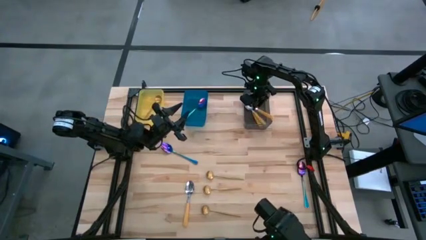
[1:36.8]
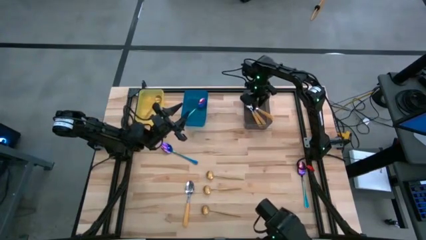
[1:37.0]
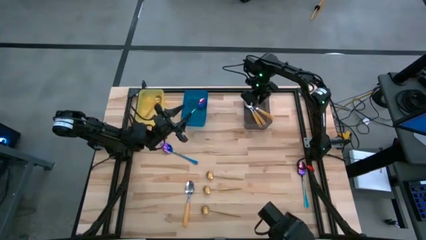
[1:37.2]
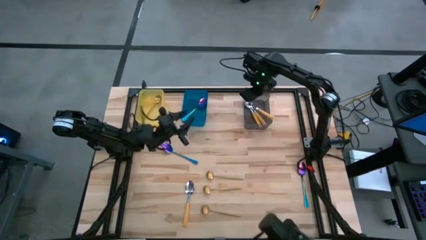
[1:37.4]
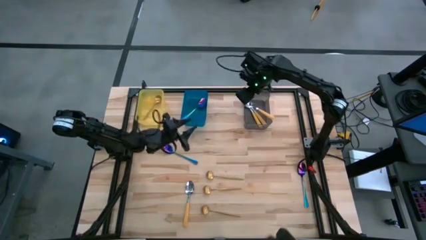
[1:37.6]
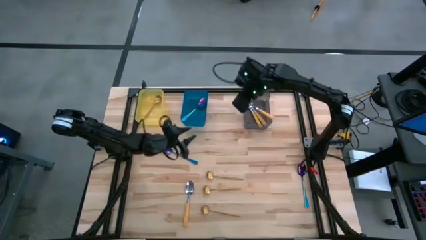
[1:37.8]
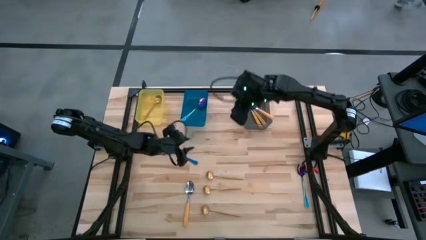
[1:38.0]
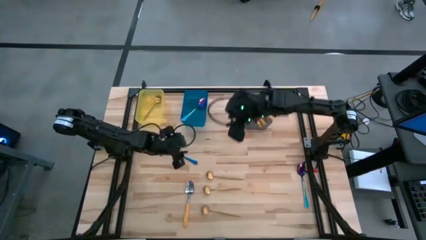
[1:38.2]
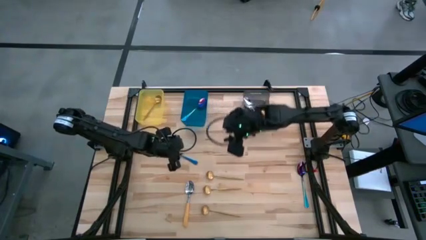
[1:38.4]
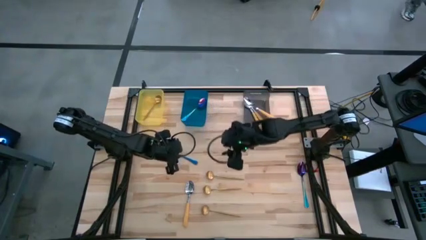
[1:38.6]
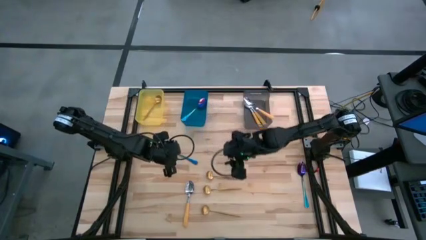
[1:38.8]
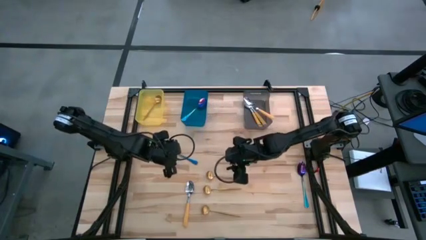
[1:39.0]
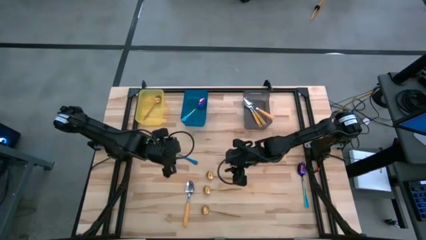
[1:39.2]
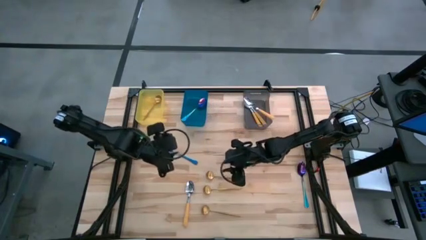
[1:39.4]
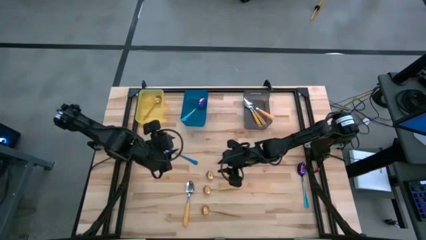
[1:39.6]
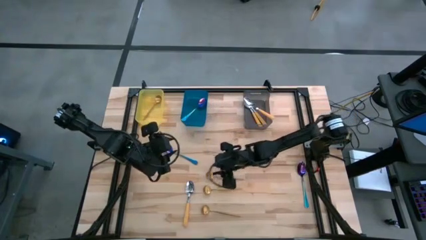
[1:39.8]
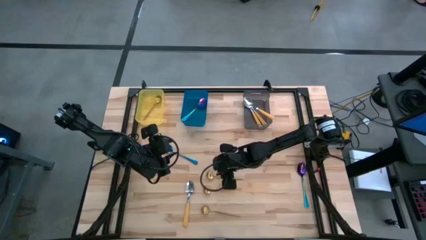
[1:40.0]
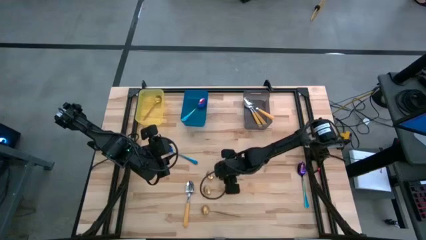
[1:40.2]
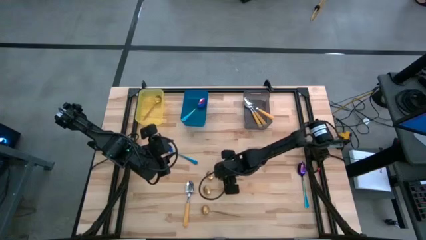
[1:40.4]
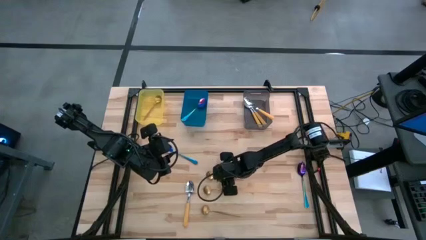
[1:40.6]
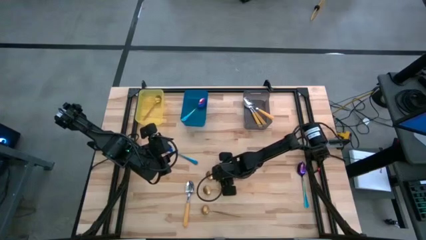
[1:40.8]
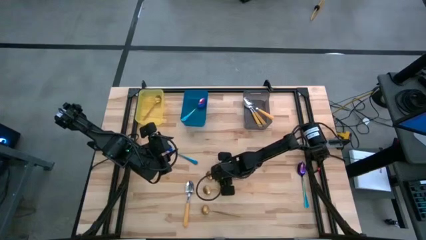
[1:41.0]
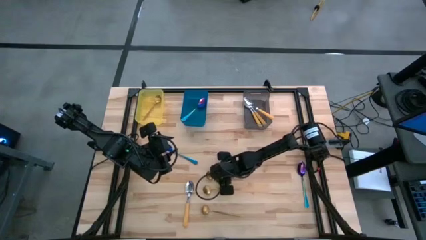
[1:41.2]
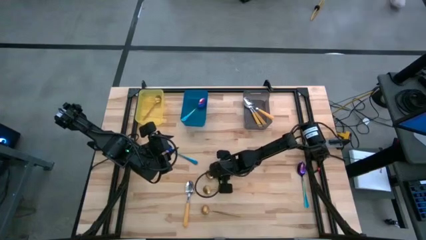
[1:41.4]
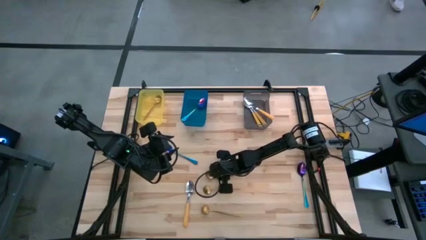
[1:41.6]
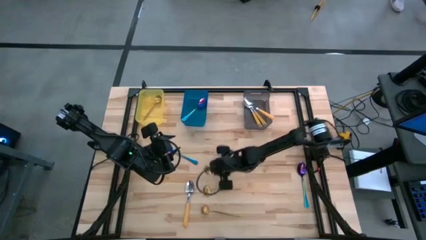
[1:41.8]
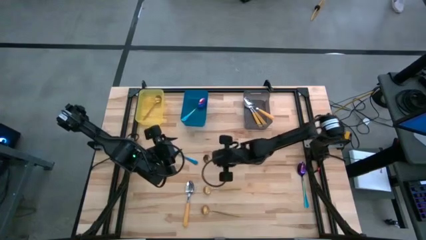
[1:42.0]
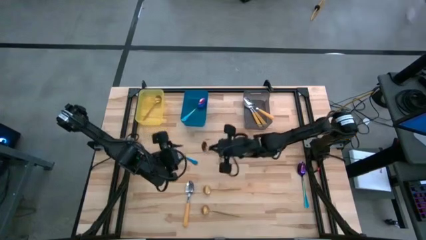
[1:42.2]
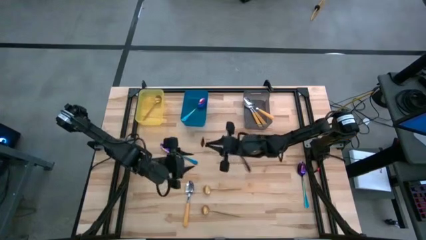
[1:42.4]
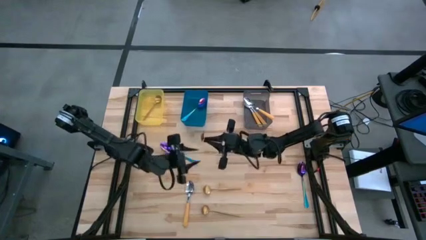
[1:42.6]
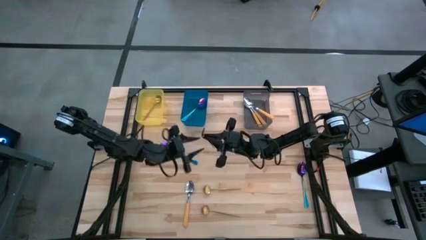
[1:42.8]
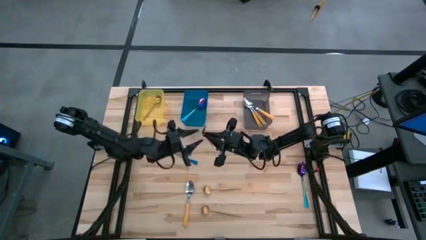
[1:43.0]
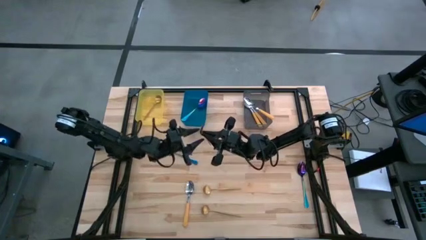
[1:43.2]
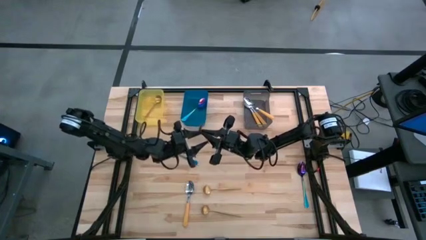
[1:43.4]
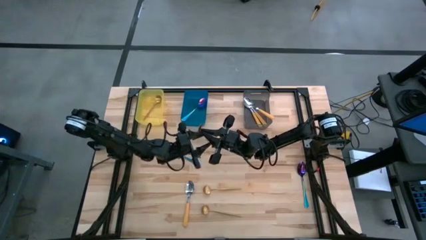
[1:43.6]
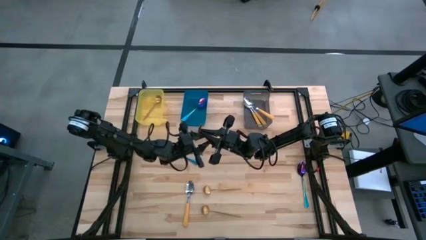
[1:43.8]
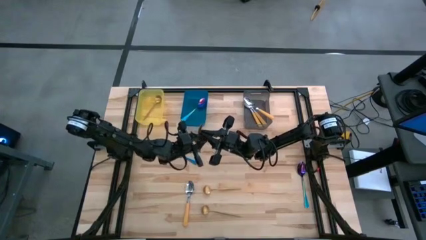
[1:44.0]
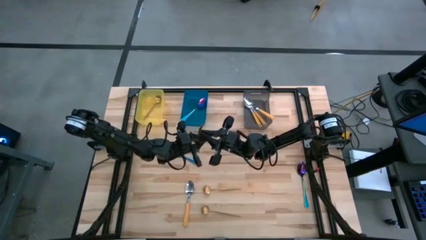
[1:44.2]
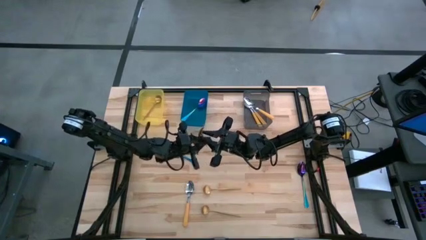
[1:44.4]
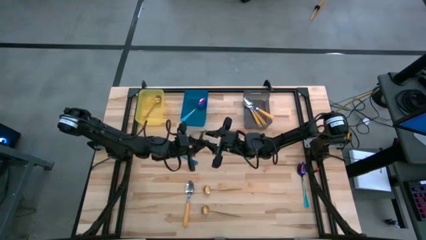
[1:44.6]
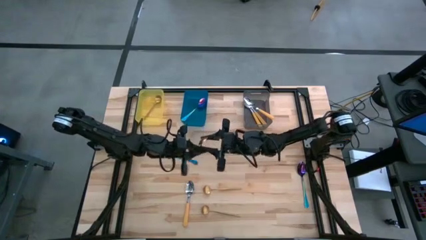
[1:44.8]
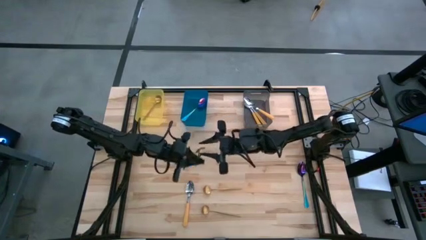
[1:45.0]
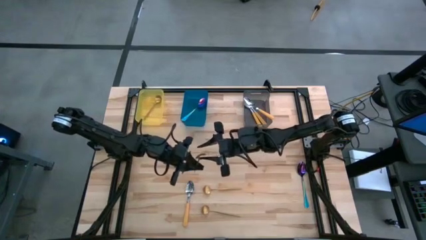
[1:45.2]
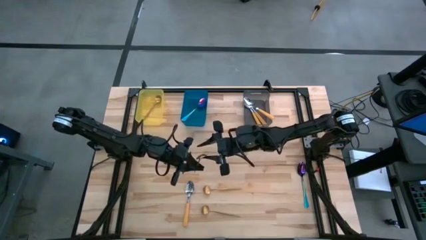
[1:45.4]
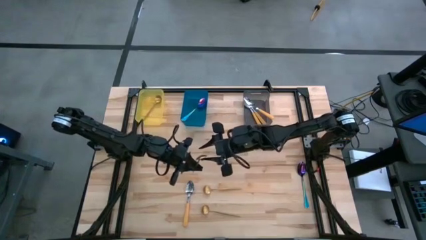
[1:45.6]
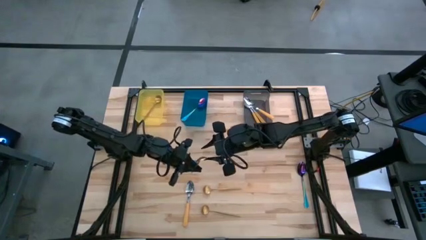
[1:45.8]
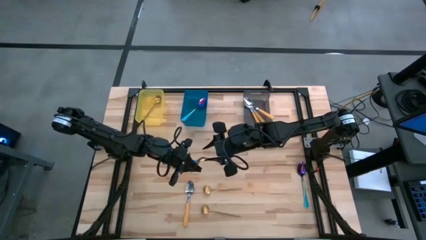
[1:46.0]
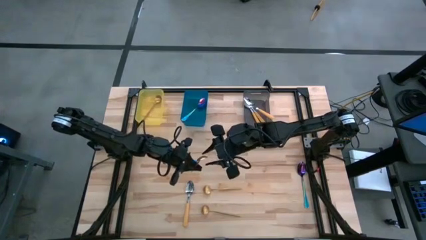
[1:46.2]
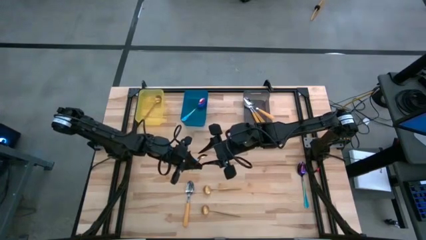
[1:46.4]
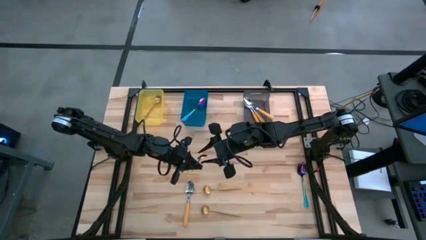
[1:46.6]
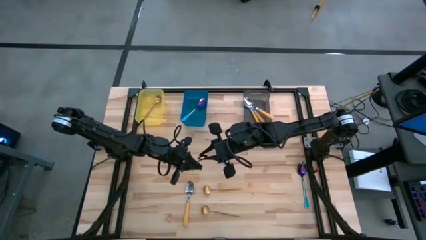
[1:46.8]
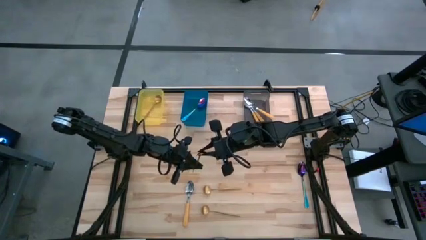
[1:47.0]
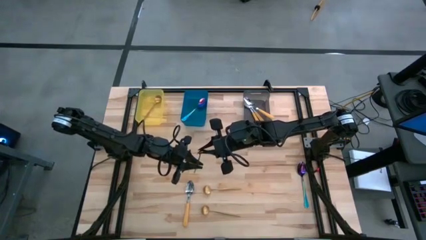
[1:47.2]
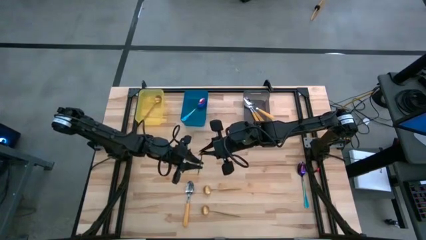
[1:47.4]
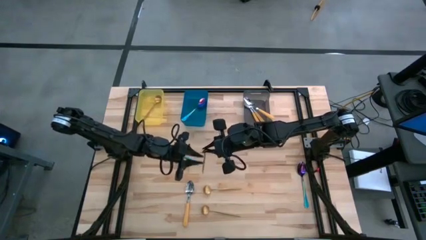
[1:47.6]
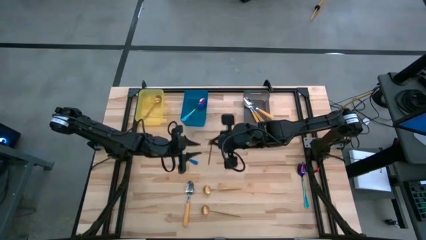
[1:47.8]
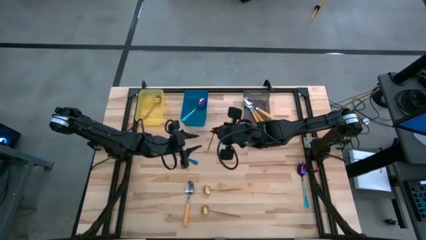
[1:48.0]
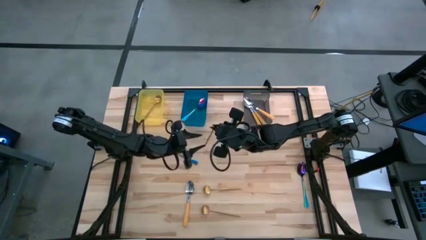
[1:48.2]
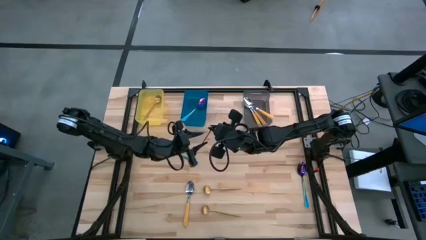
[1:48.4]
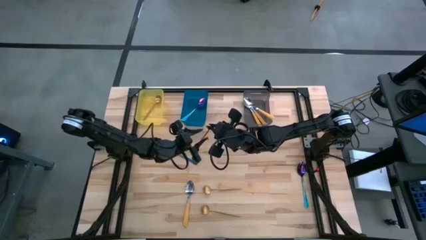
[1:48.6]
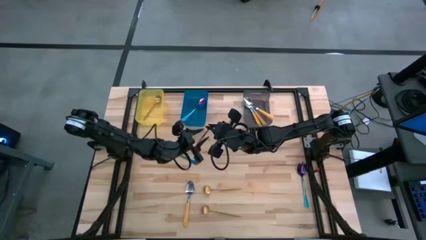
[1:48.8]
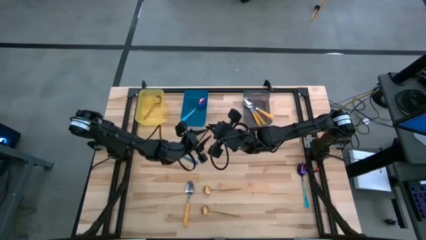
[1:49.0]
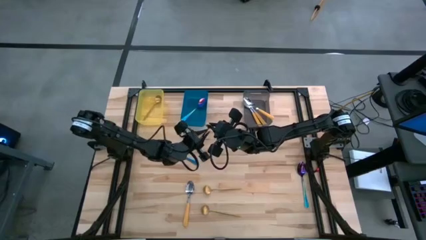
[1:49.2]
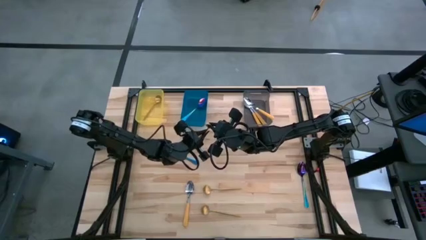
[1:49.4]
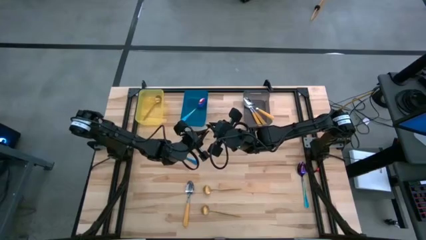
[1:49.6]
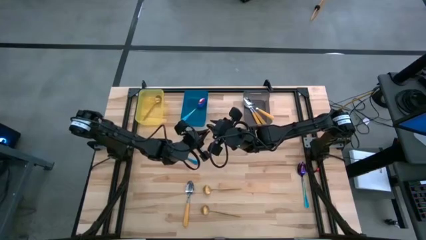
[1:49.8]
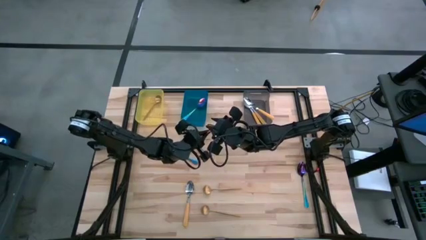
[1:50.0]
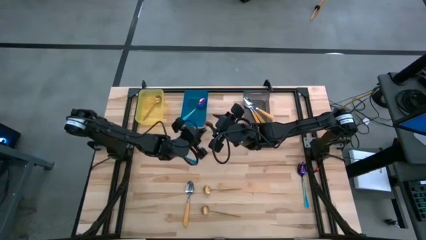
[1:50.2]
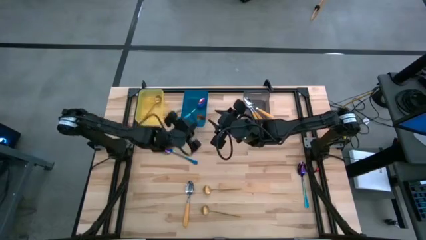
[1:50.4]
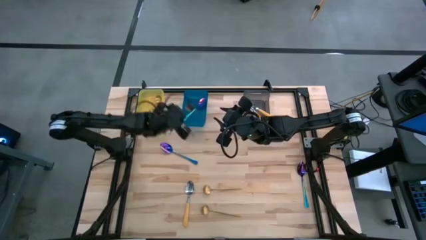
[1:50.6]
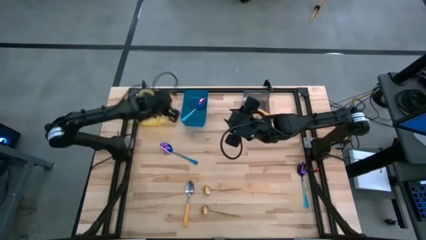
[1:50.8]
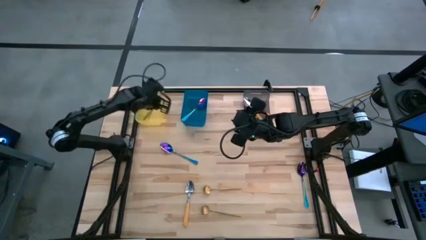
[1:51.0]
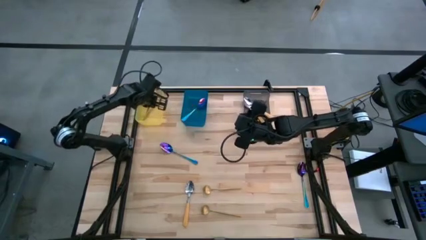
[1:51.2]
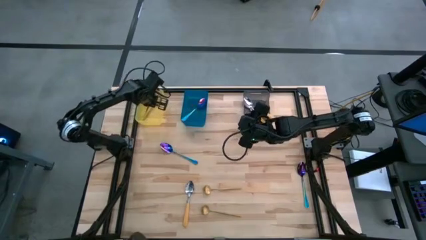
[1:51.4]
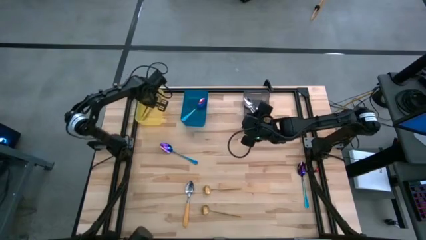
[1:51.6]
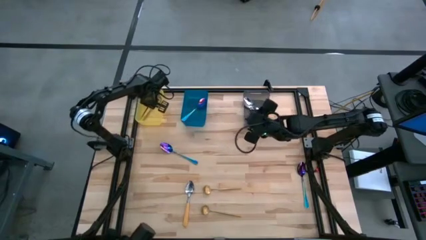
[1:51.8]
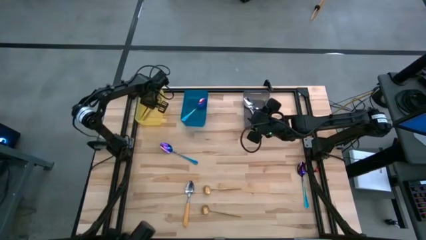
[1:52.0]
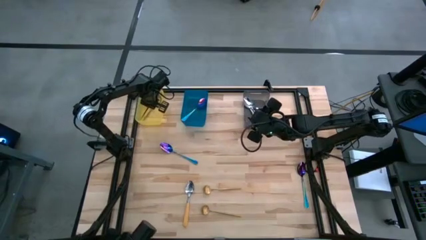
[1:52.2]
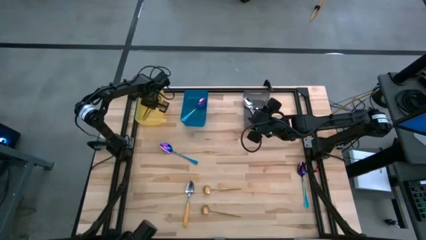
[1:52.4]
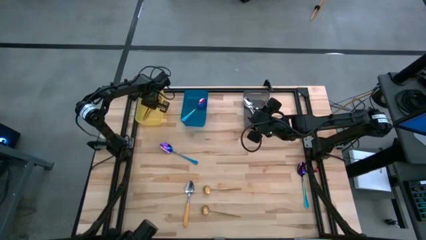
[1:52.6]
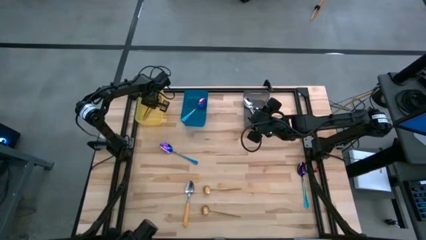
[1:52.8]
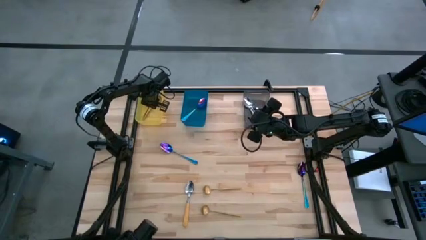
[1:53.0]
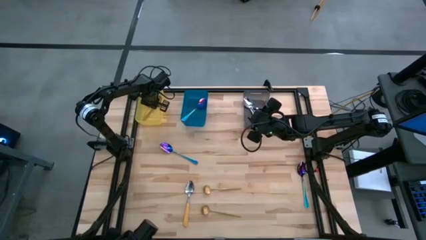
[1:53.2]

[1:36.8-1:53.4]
Task: Sort silverware by color (type)
Put the gold spoon into the yellow bin

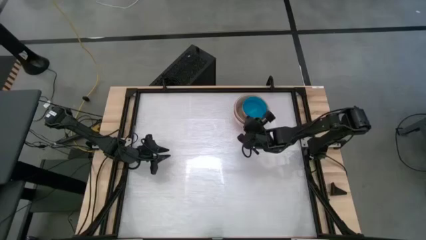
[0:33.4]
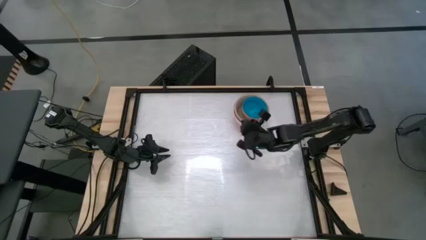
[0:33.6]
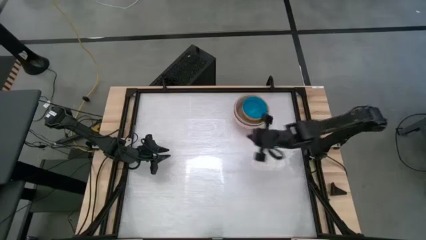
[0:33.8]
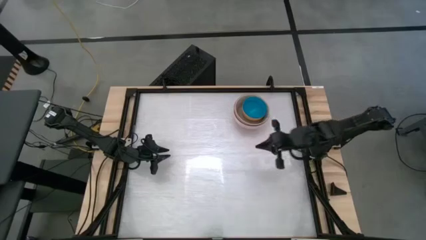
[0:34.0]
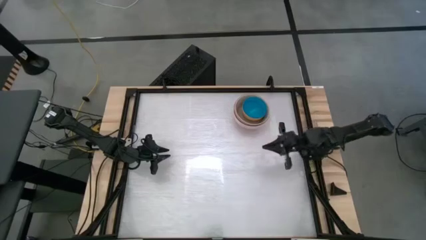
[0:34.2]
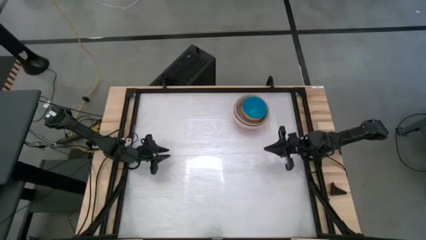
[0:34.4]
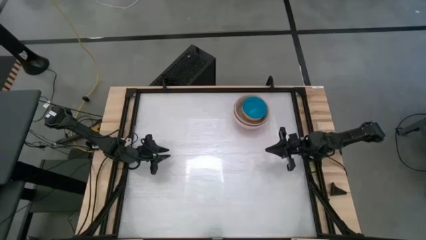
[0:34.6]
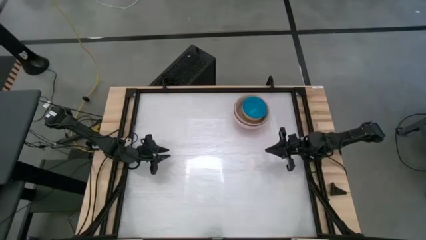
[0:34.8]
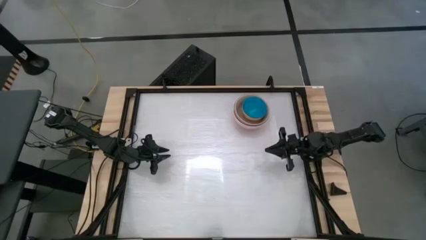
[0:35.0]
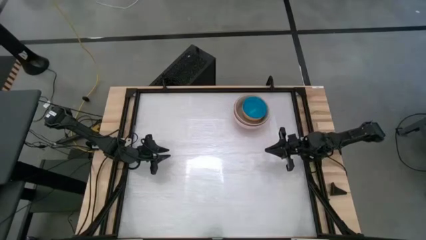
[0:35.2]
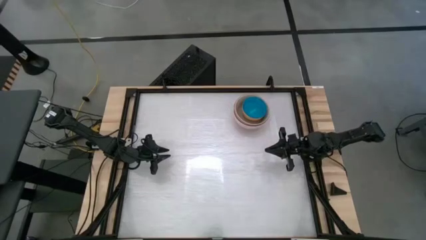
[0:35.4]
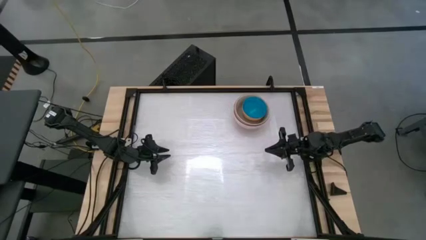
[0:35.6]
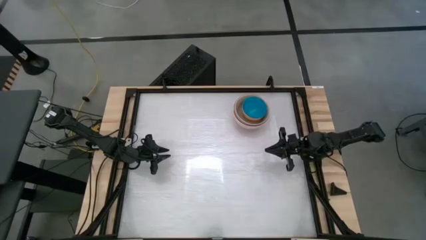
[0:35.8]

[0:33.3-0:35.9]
Task: Nest bowls inside each other by size order
Return to Home Position
